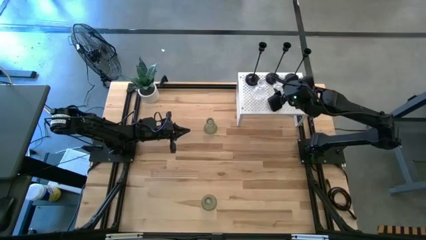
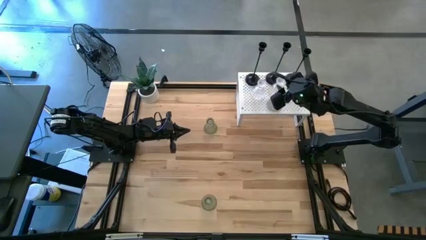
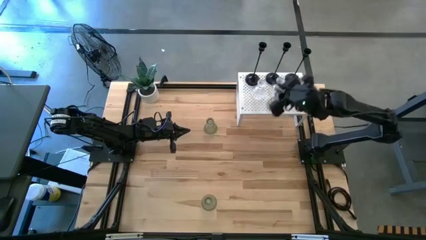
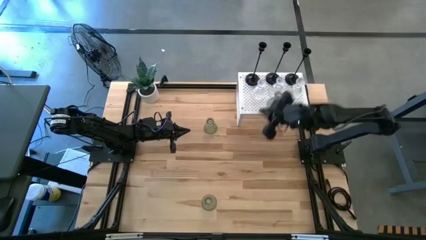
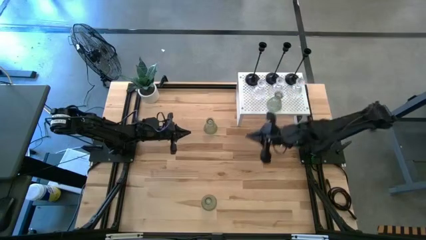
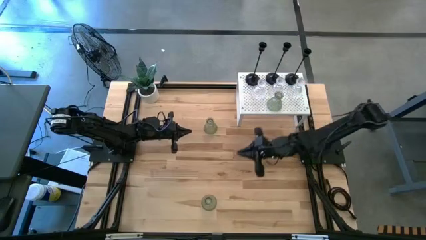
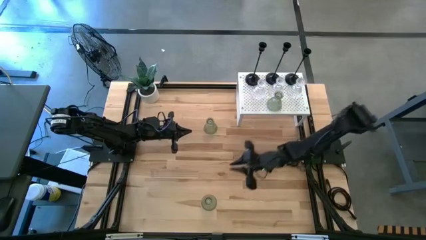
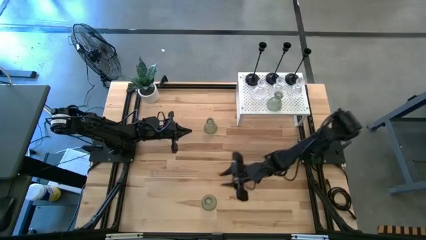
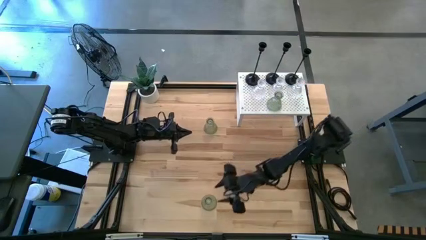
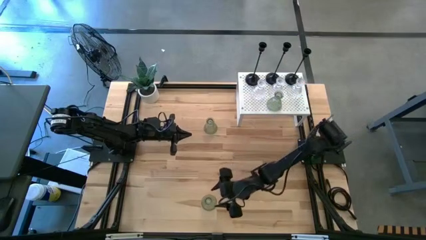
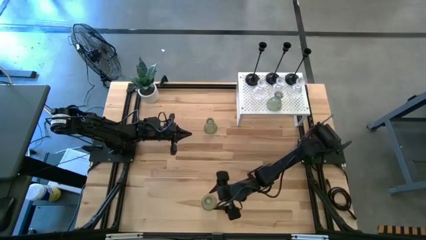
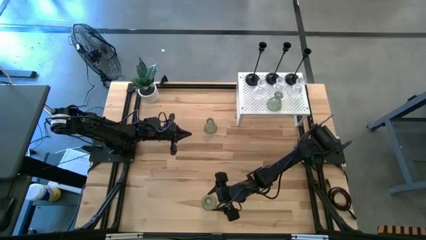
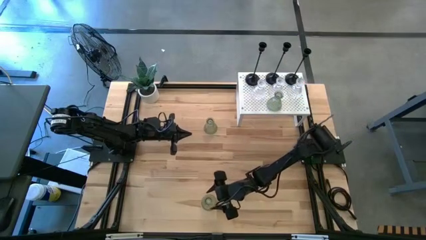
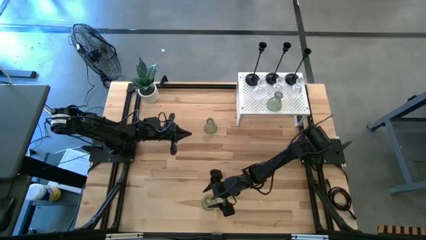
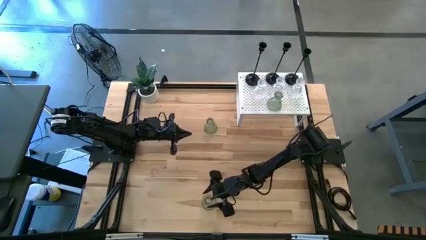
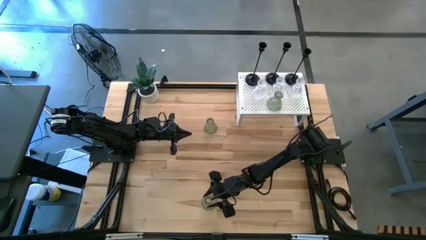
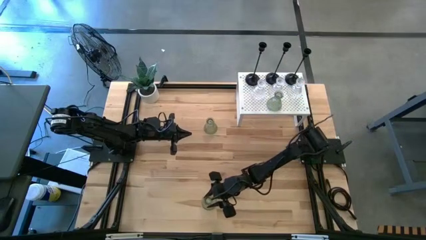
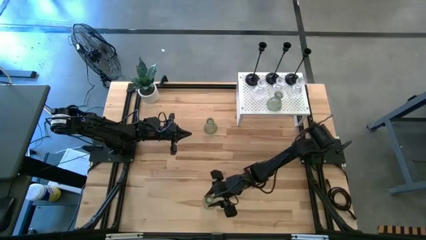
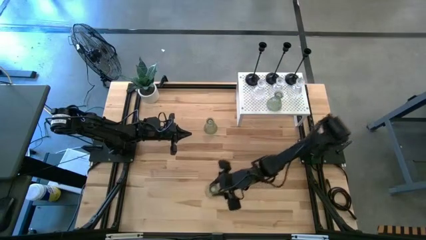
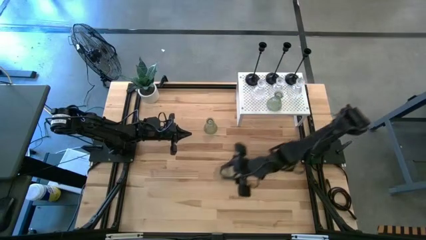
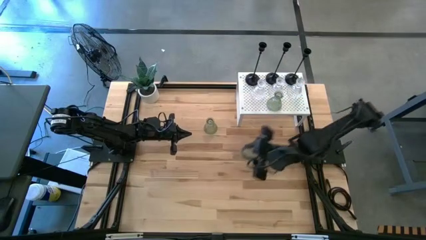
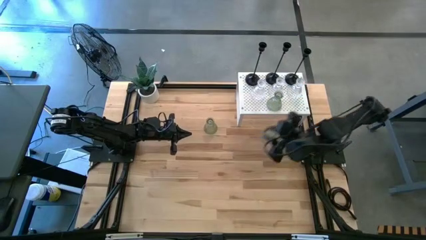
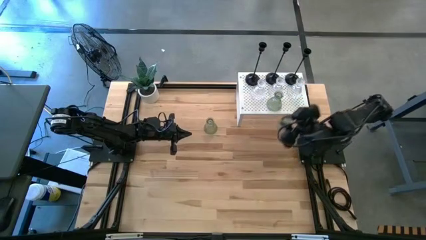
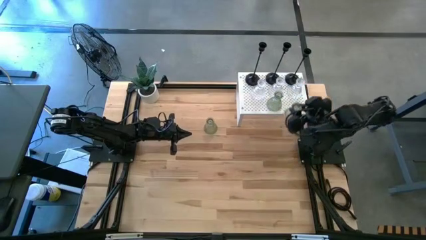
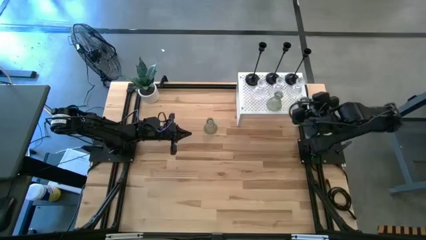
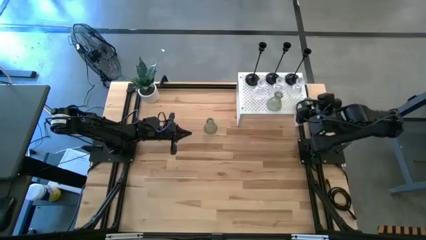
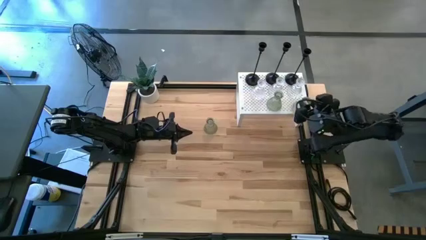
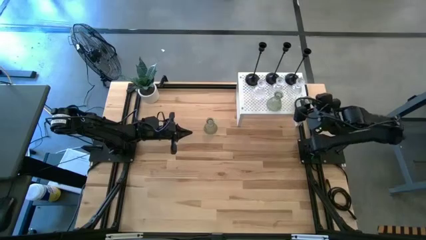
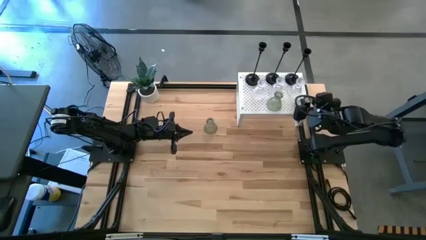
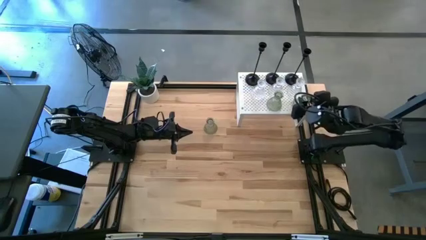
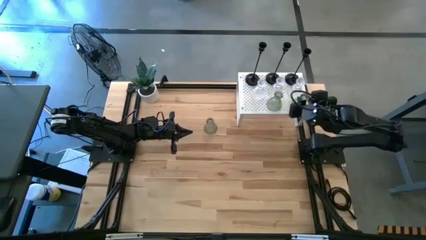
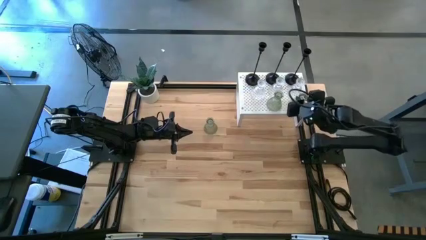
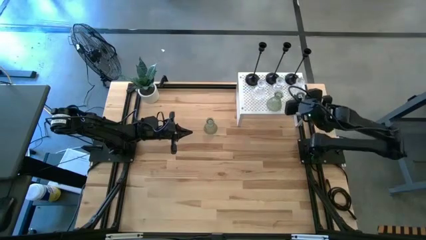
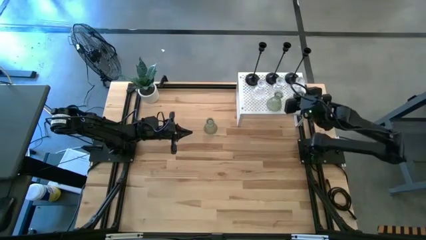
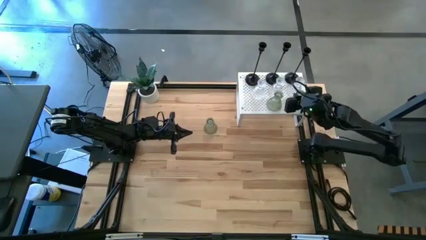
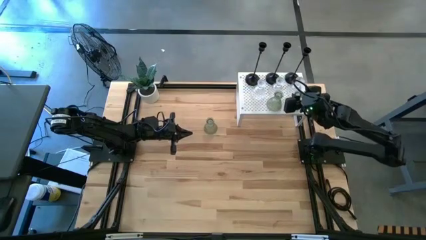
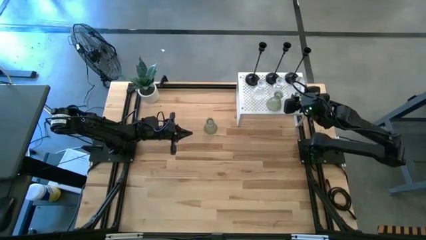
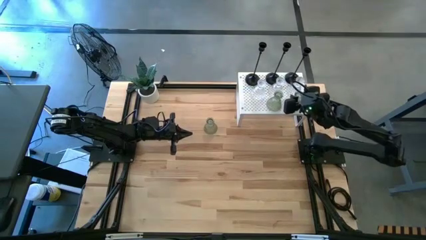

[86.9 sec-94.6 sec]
Task: Pick & Place candle stick holders
Put the bottom green glass candle holder on the shelf aligned with the other green glass candle holder

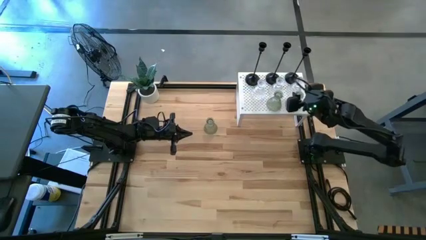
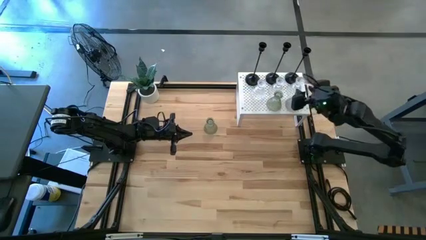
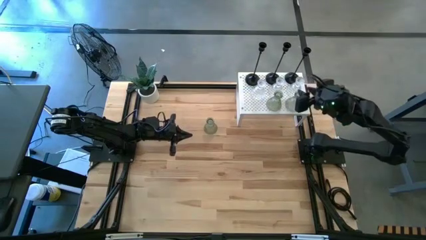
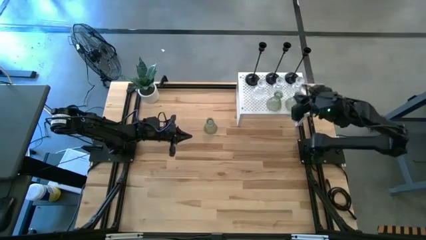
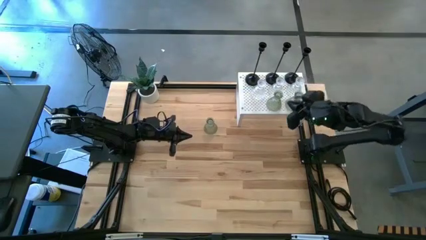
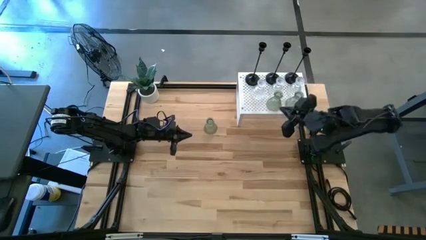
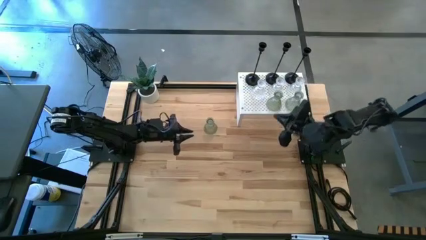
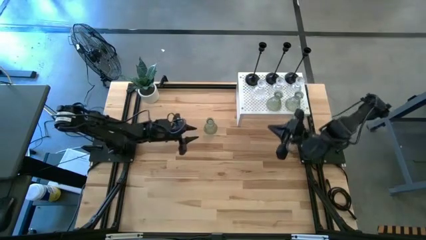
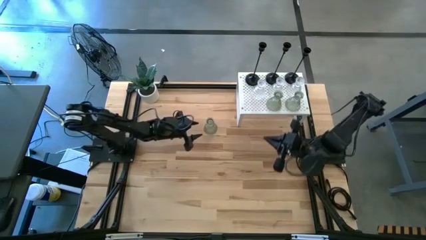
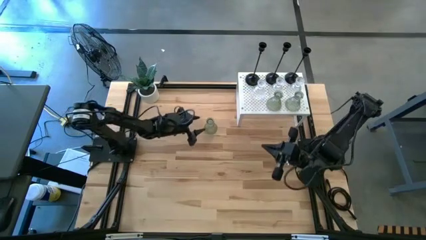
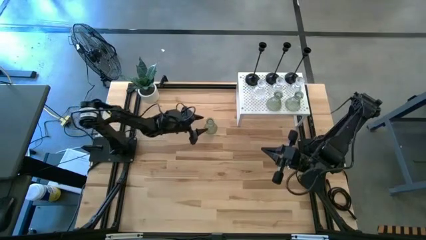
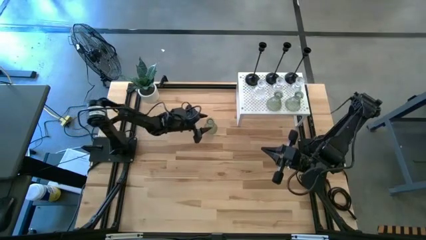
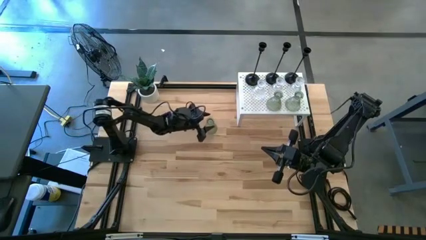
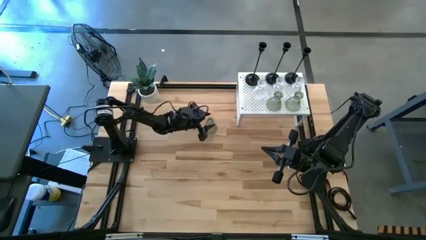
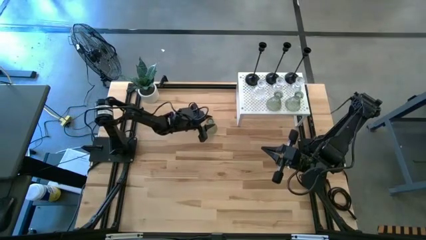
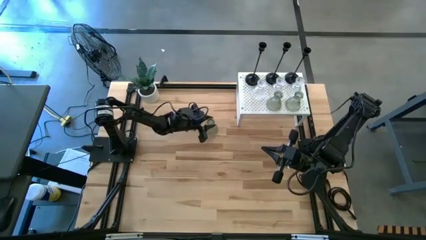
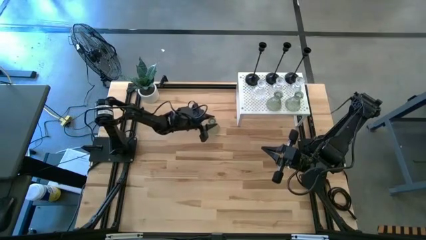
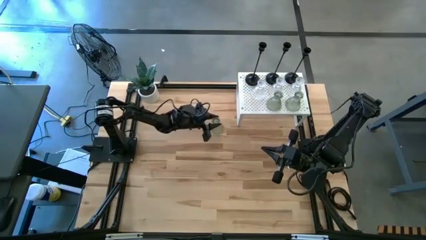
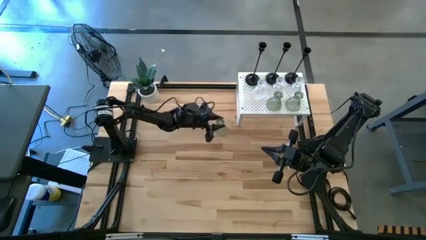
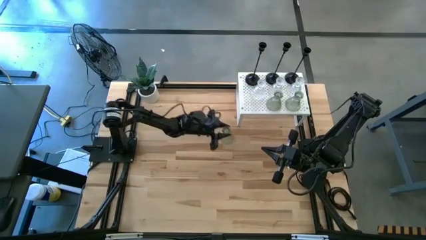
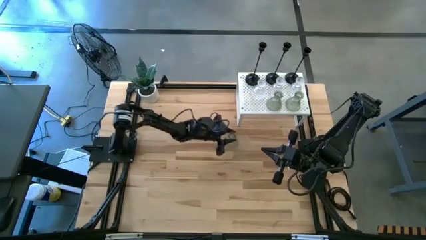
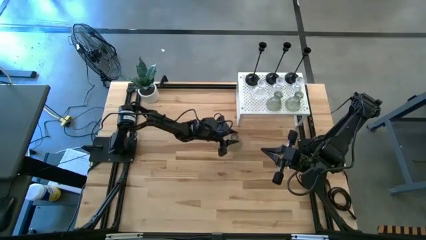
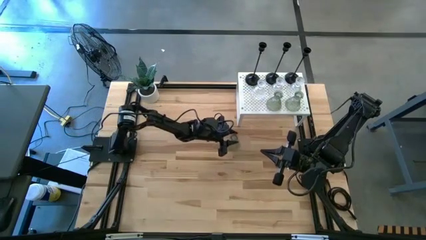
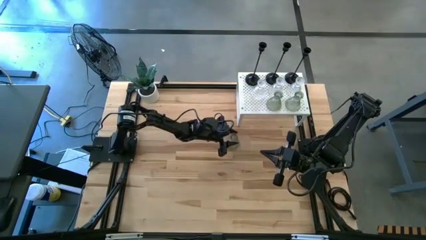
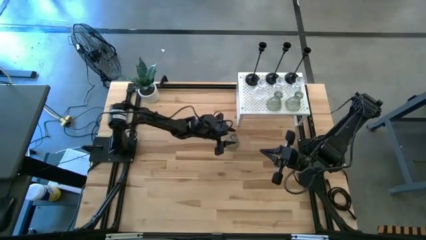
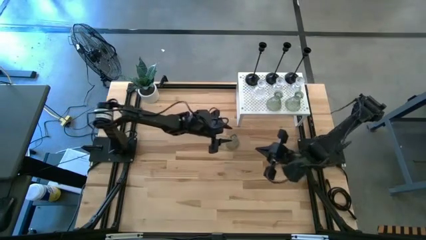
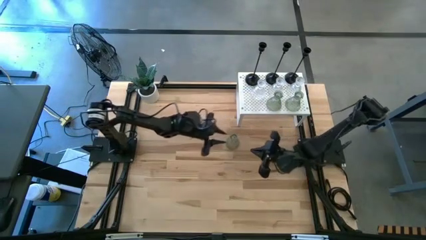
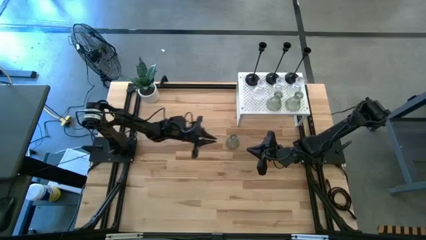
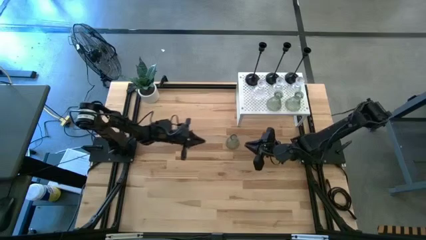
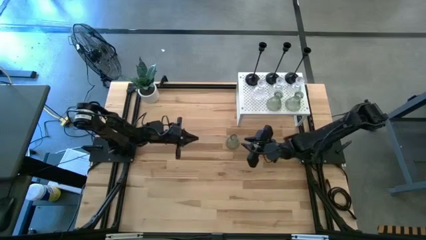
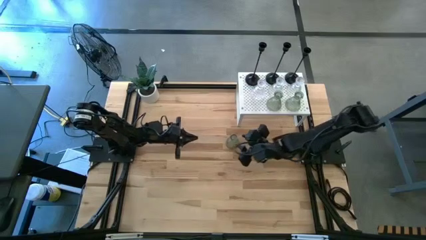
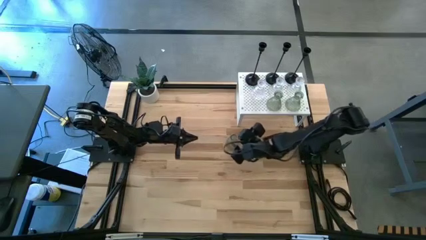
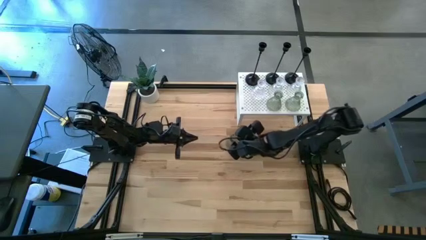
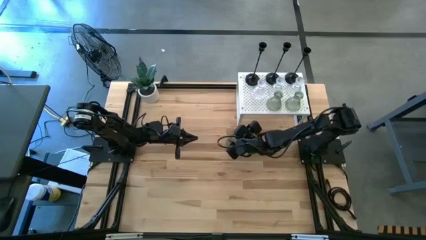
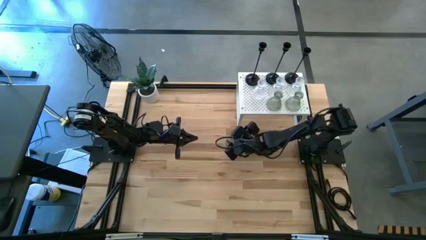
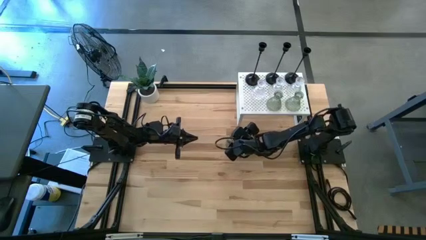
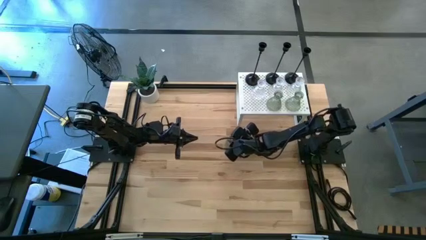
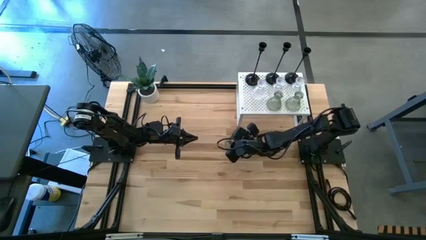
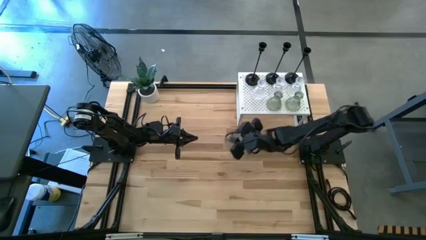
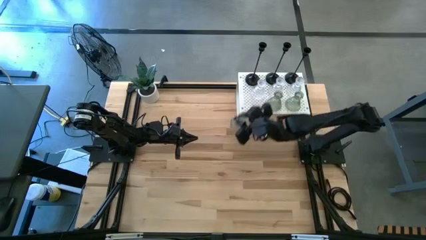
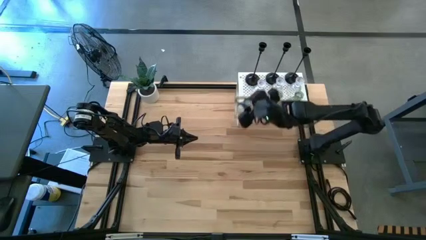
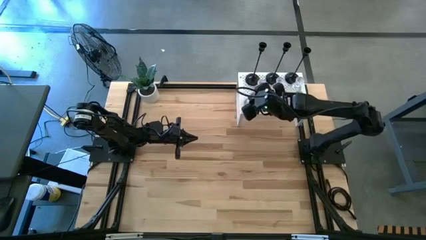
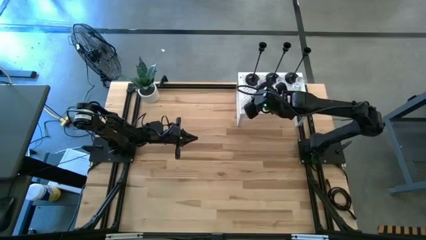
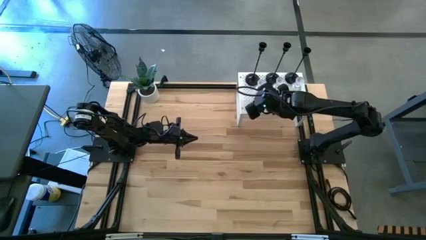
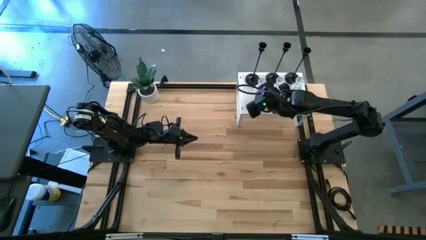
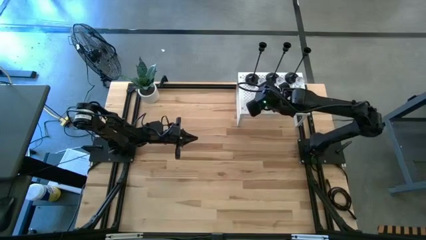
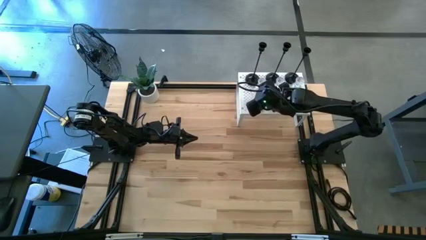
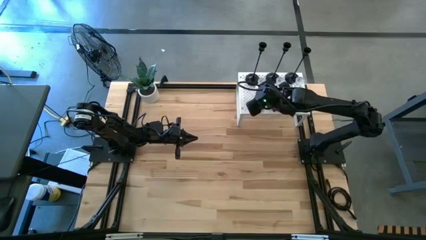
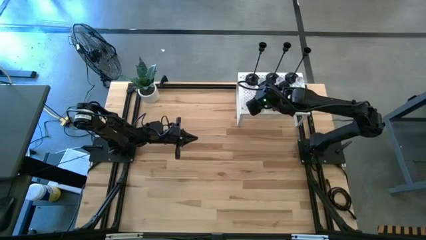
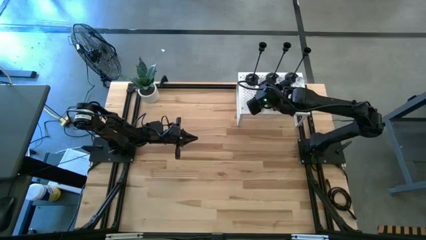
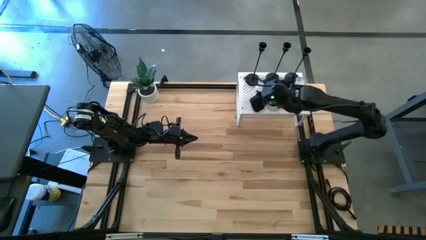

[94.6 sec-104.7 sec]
Put the green glass candle holder on the shelf aligned with the other green glass candle holder
